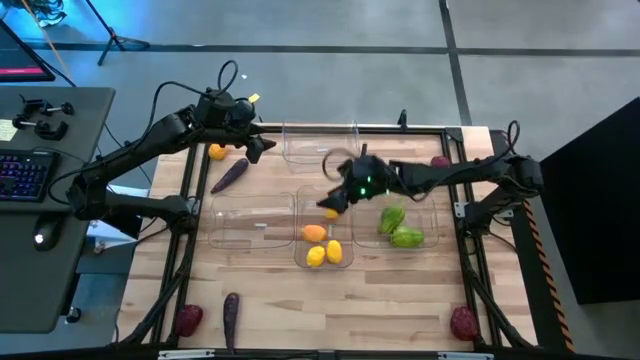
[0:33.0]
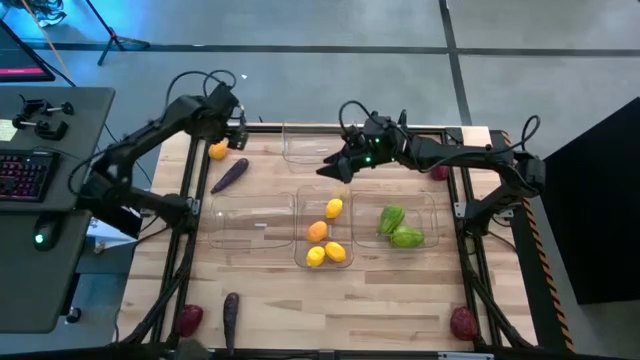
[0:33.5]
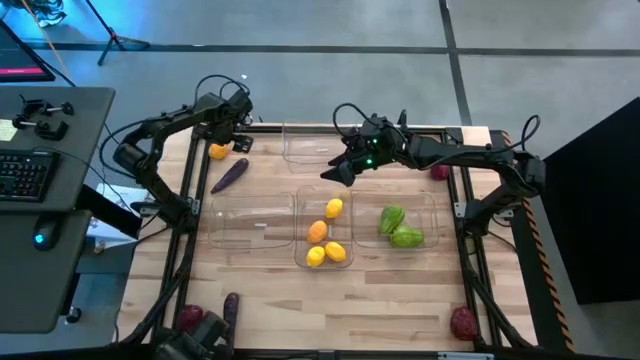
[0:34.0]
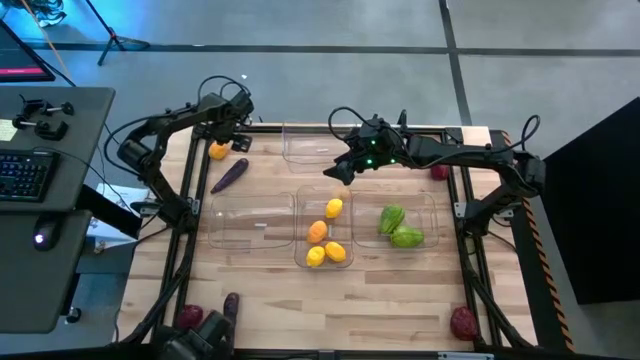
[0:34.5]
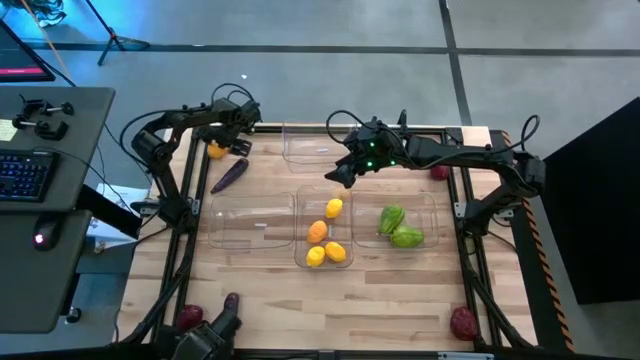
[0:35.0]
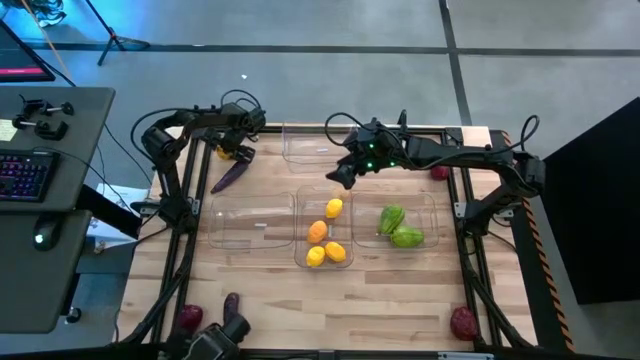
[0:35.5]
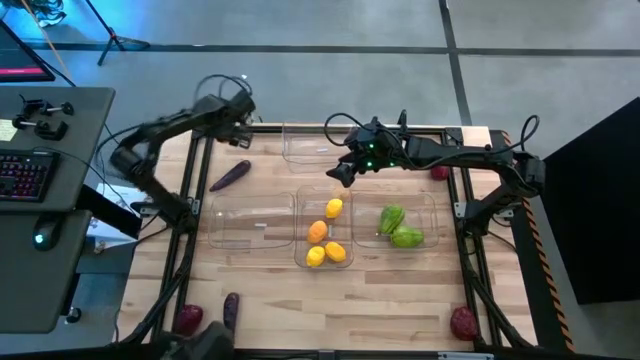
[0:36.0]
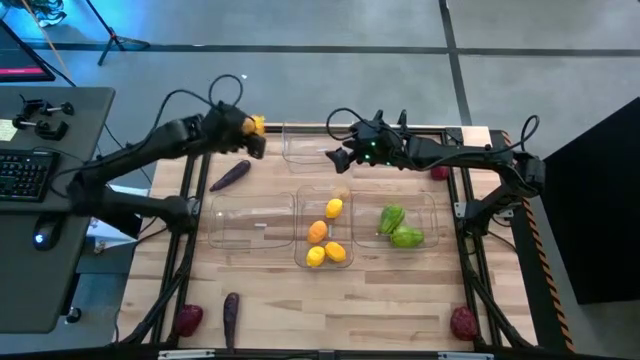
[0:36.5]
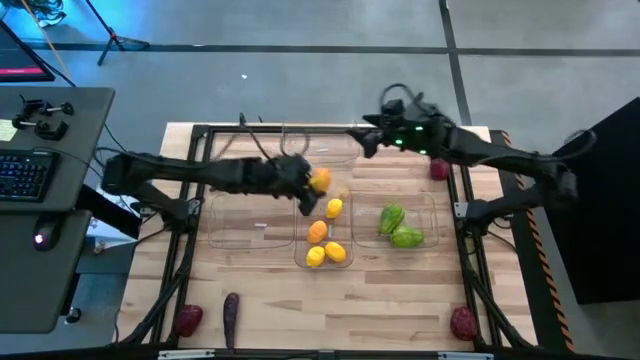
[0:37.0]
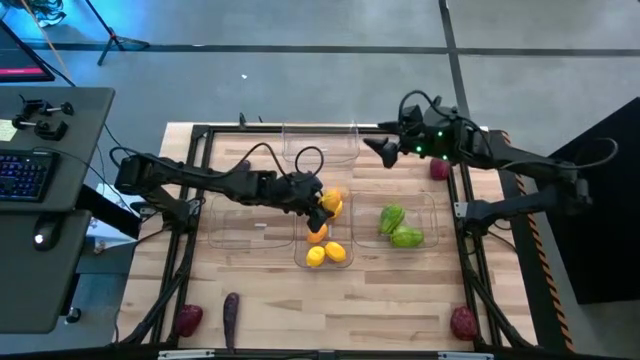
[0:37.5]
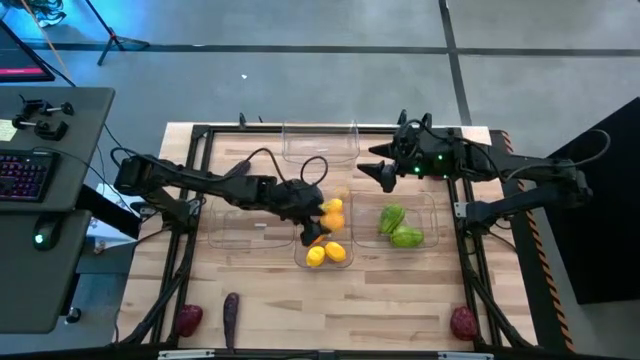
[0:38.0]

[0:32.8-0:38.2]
Task: Sort produce into baskets
Put the lemon into the middle transparent bin

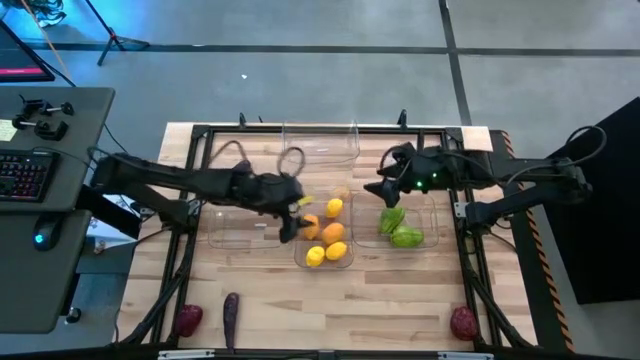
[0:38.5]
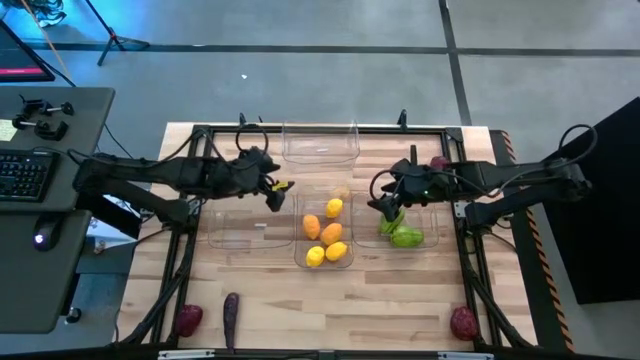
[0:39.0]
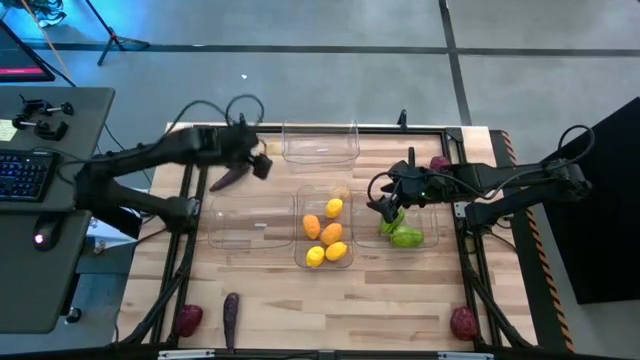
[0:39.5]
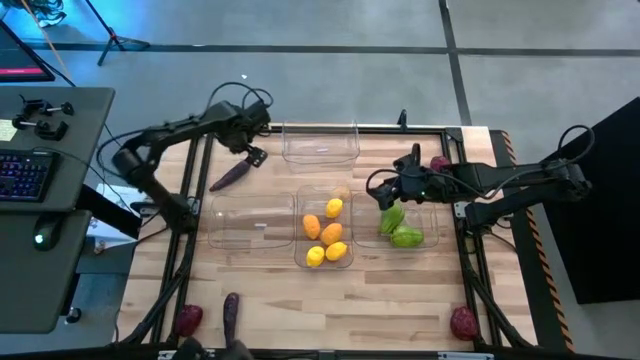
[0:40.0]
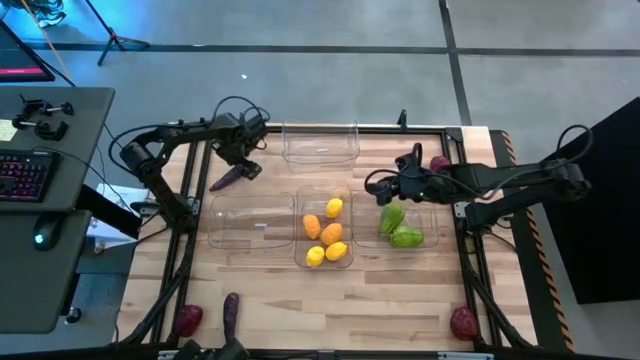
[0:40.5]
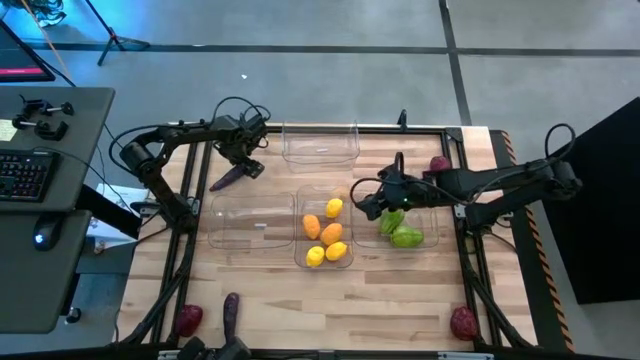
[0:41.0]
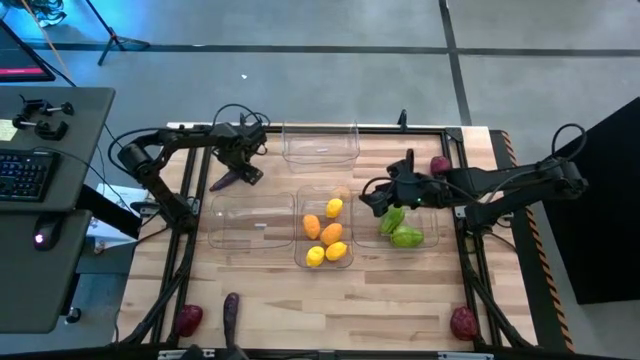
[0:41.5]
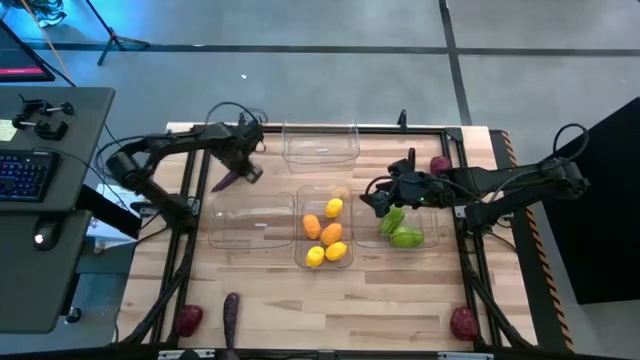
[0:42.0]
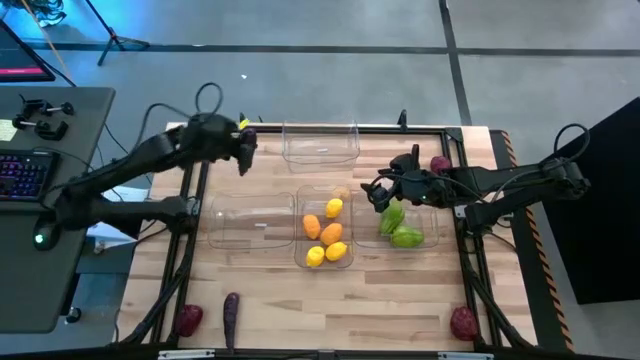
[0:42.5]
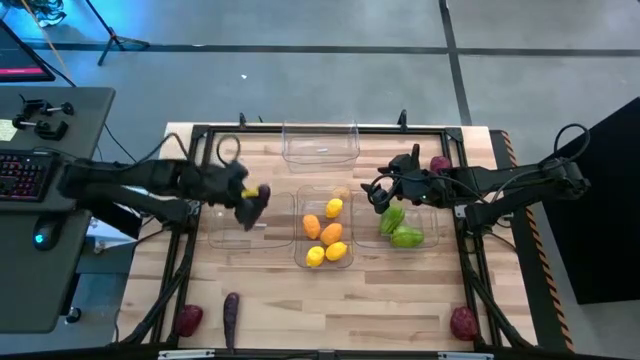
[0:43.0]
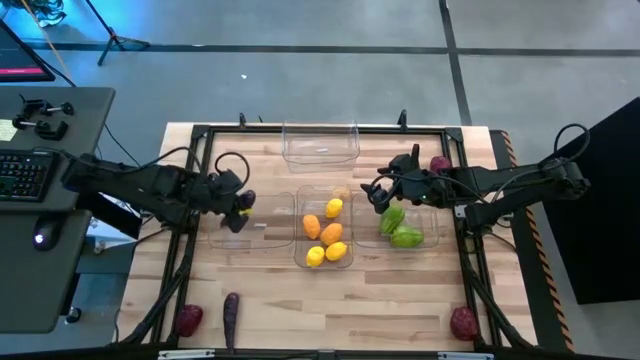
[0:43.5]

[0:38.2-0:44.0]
Put the eggplant into the bottom left transparent bin

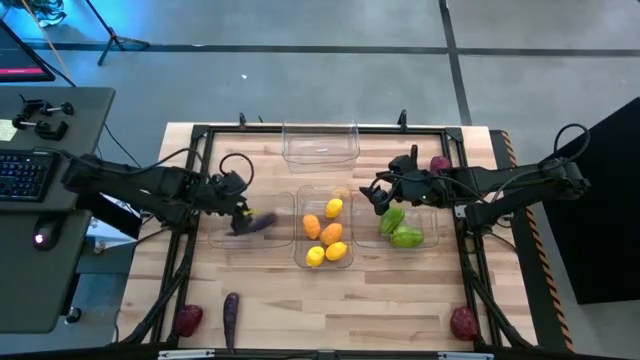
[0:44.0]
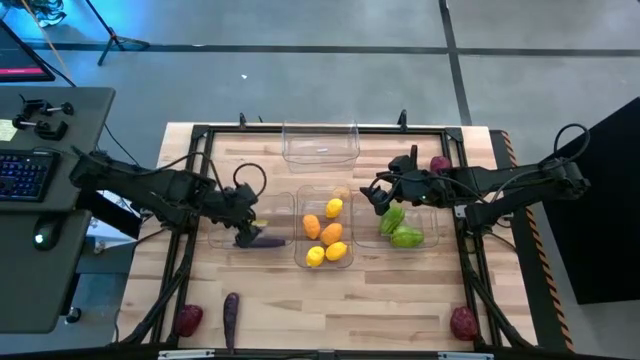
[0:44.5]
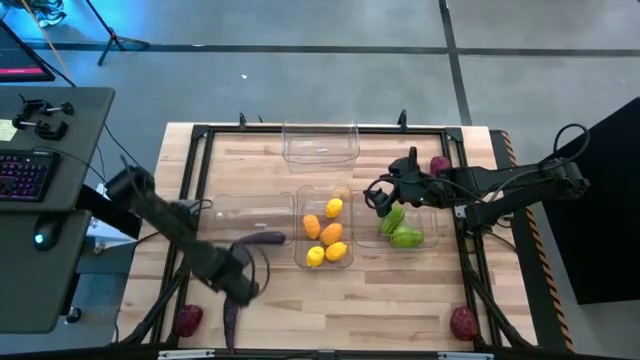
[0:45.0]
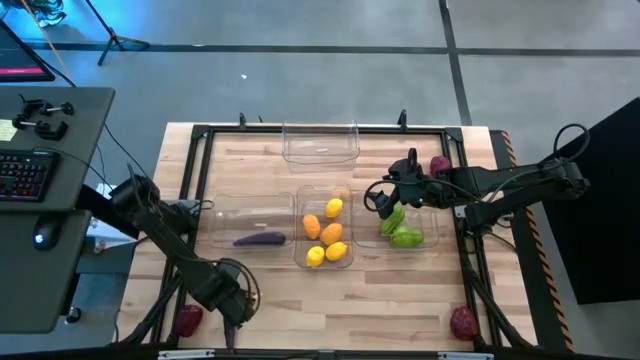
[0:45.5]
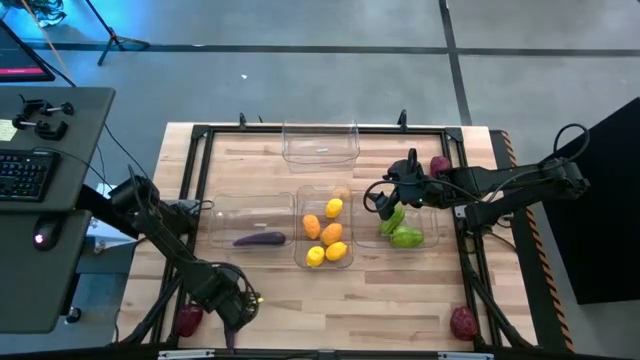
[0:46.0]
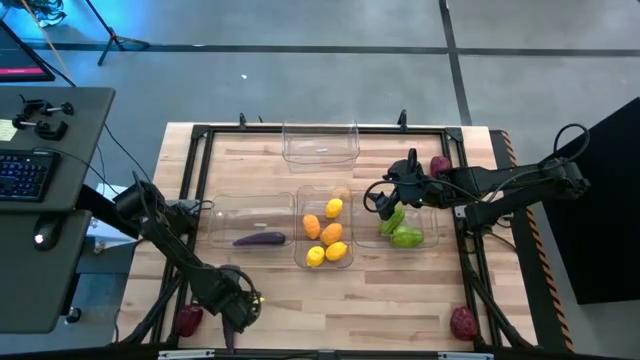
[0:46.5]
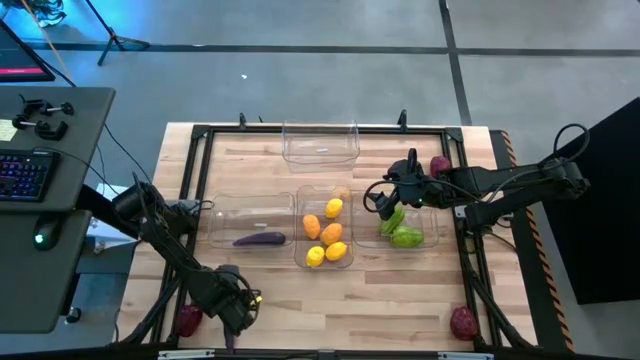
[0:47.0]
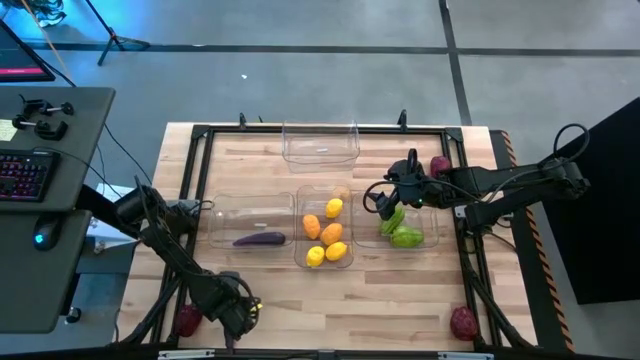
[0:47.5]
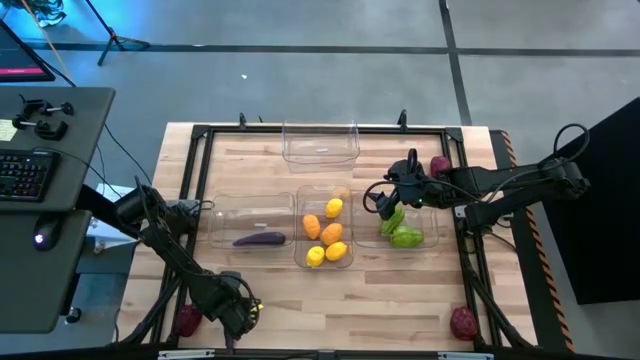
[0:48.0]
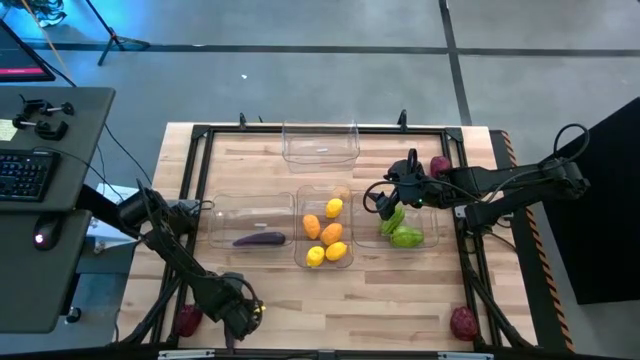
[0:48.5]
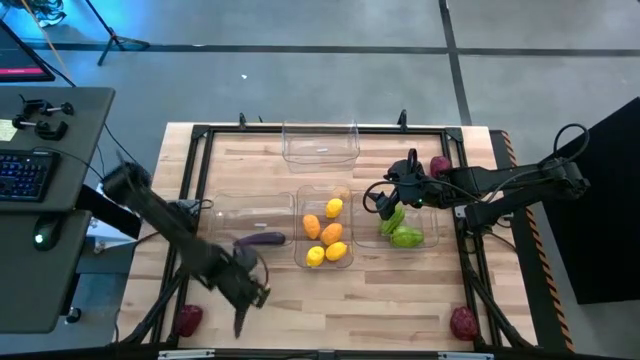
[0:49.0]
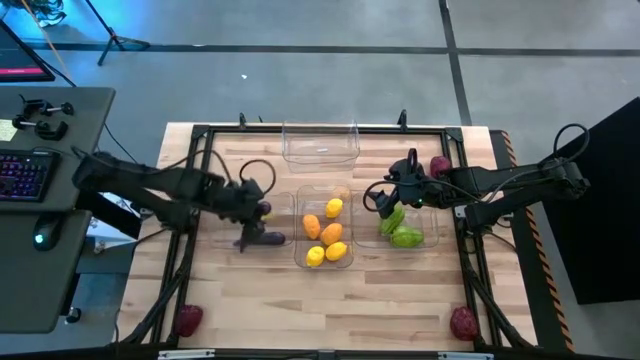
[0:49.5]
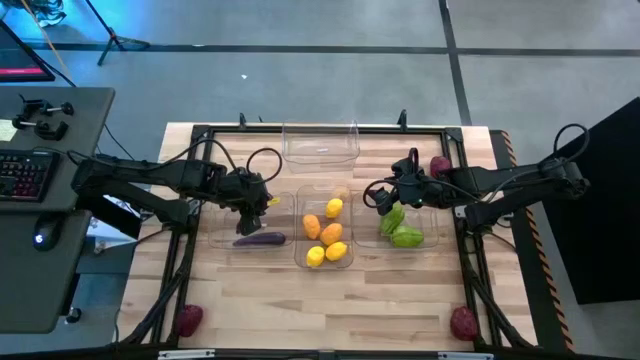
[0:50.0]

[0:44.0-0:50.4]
Put the eggplant into the bottom left transparent bin

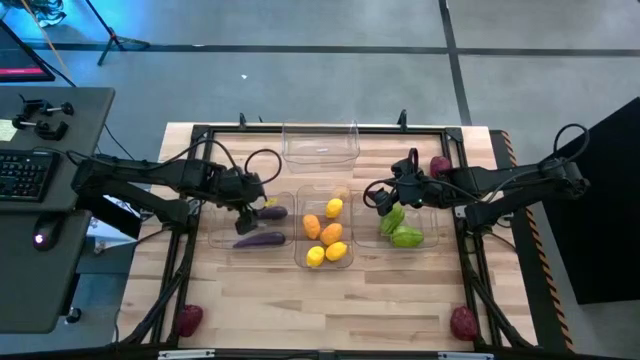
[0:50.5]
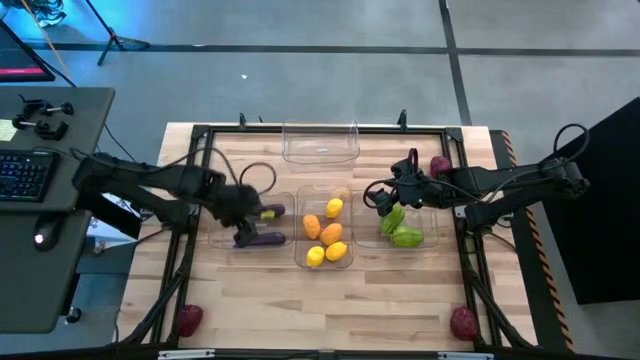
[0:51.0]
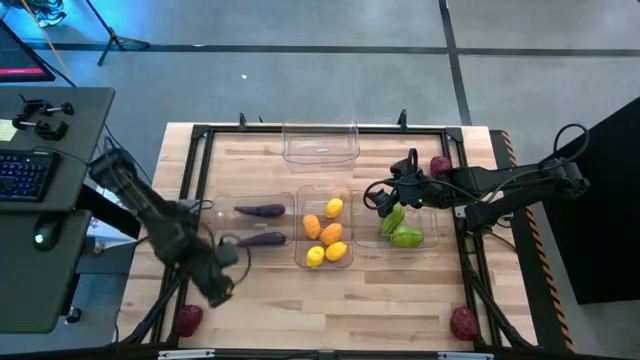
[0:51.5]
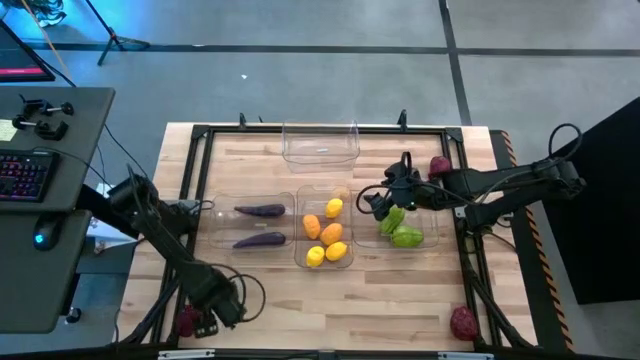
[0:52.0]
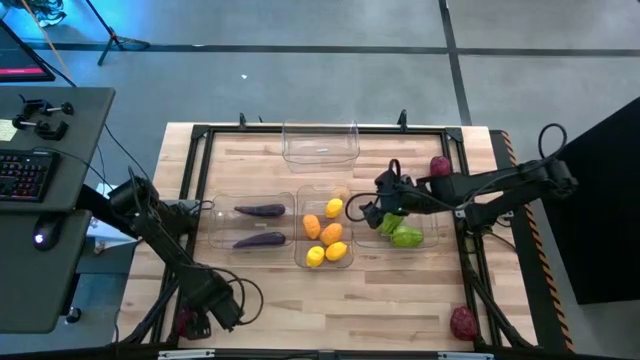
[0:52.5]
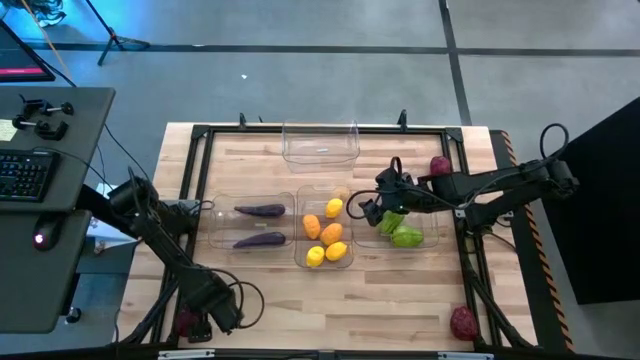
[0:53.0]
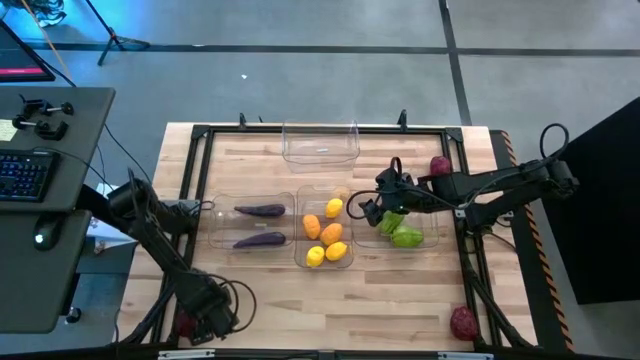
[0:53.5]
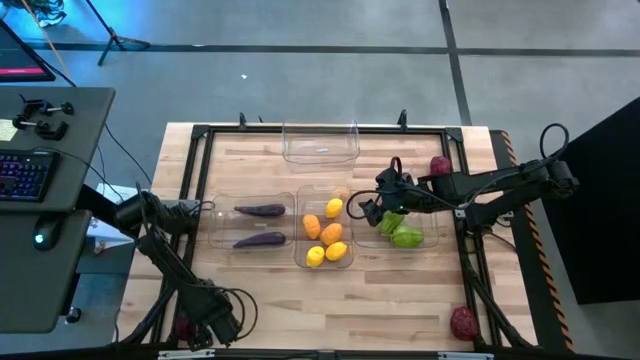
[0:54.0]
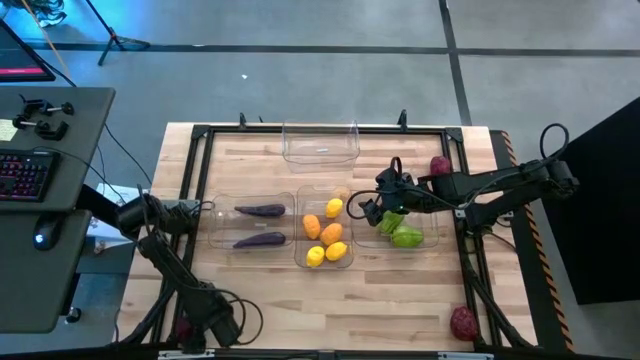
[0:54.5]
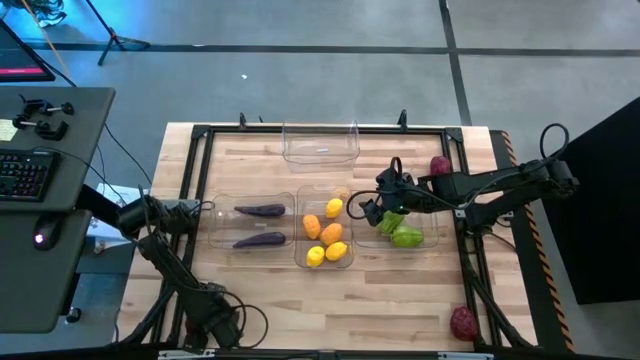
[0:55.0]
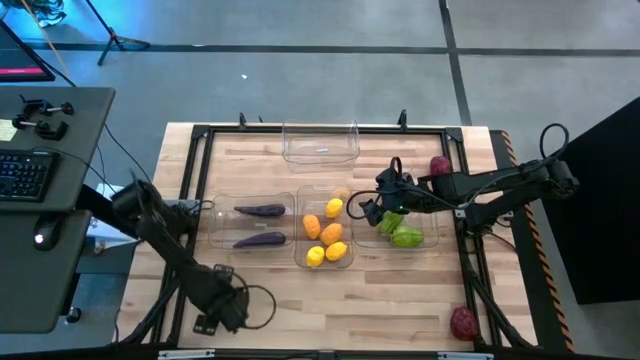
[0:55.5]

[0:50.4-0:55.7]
Put the apple into the top transparent bin
